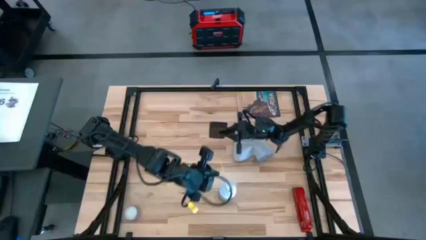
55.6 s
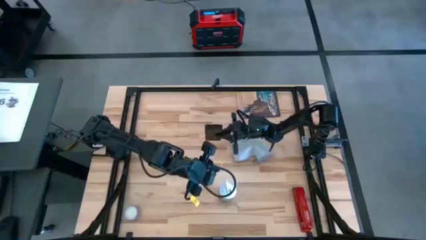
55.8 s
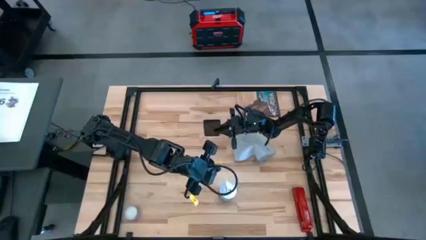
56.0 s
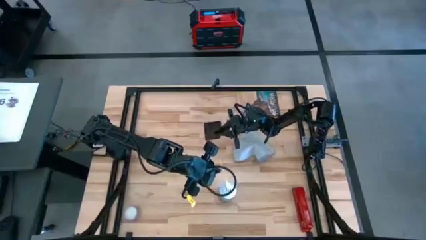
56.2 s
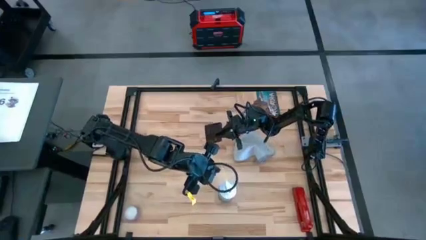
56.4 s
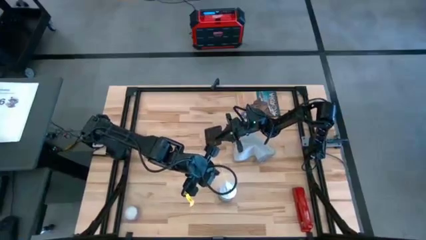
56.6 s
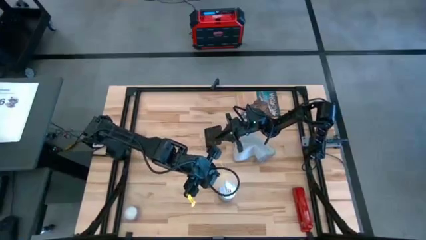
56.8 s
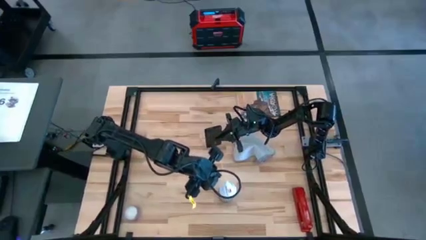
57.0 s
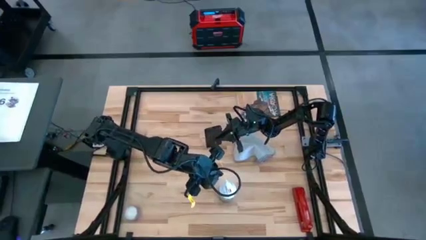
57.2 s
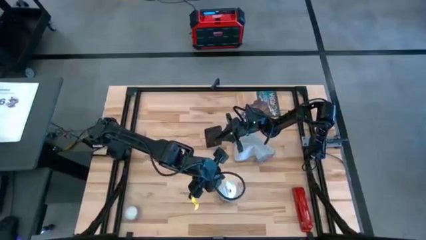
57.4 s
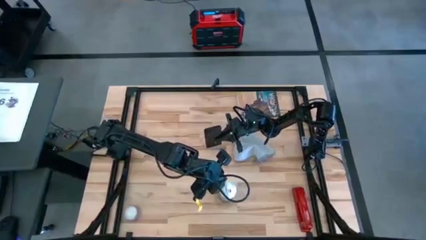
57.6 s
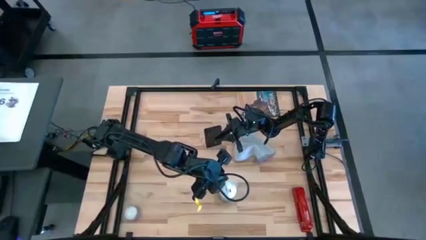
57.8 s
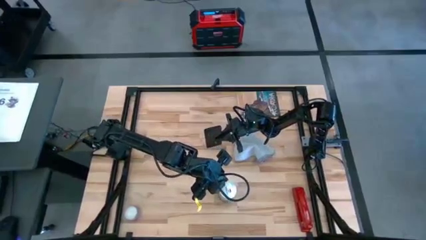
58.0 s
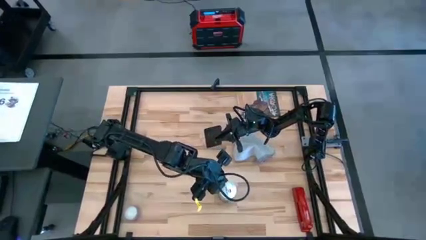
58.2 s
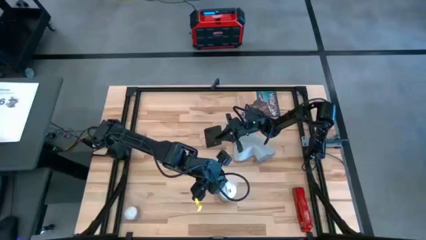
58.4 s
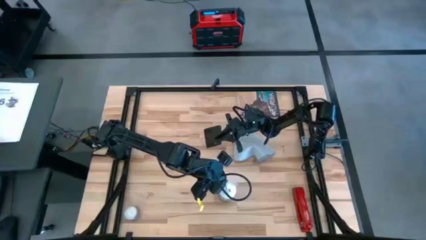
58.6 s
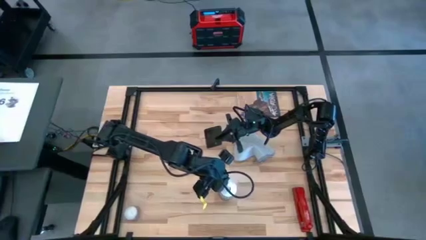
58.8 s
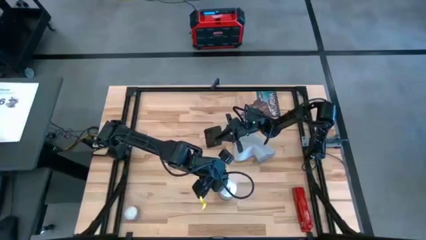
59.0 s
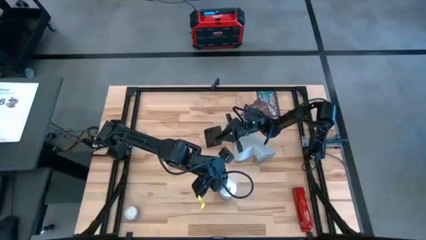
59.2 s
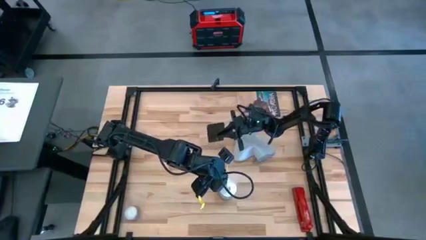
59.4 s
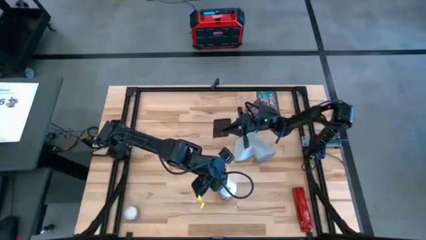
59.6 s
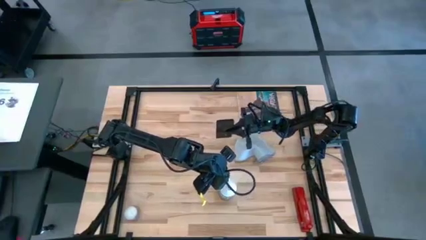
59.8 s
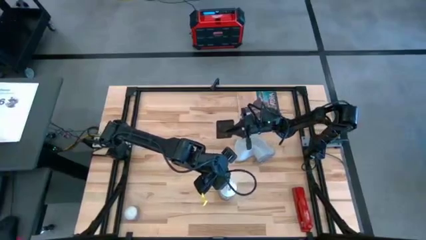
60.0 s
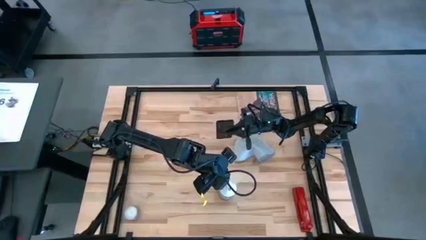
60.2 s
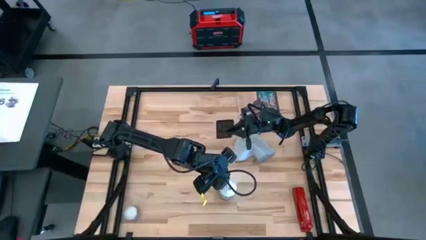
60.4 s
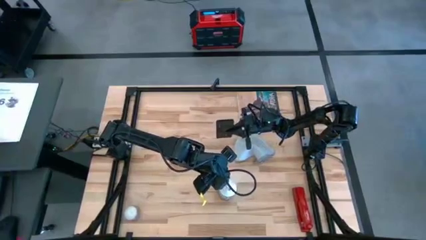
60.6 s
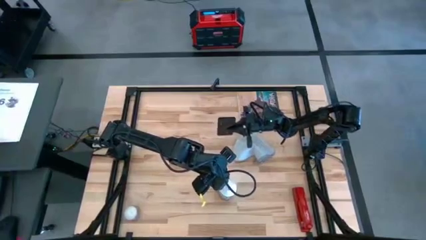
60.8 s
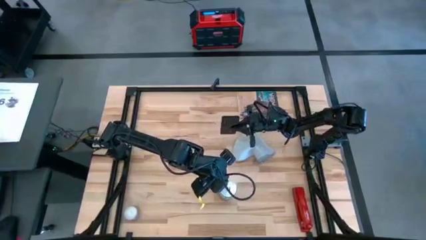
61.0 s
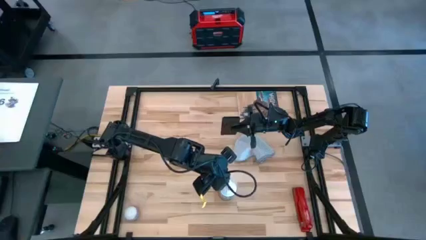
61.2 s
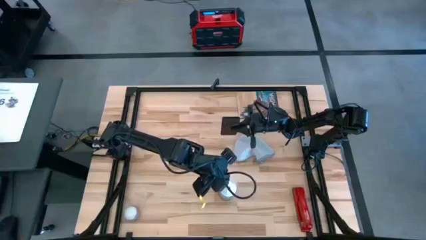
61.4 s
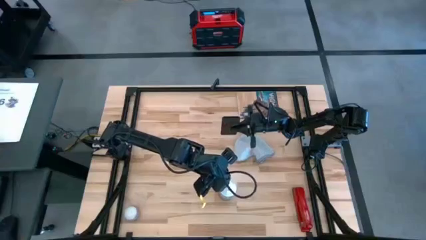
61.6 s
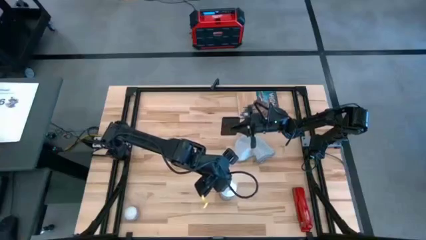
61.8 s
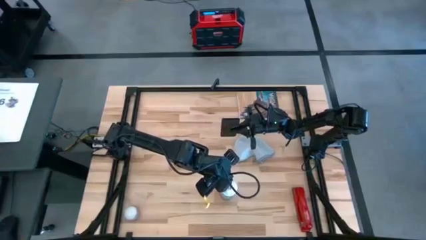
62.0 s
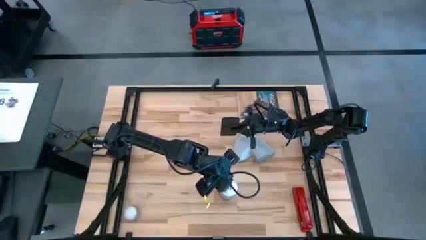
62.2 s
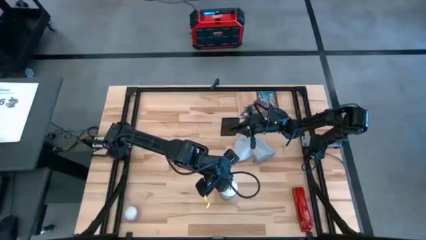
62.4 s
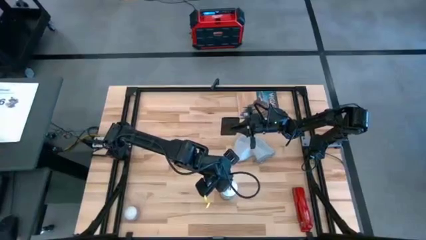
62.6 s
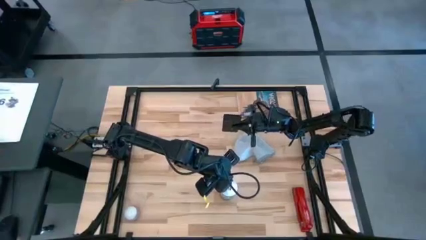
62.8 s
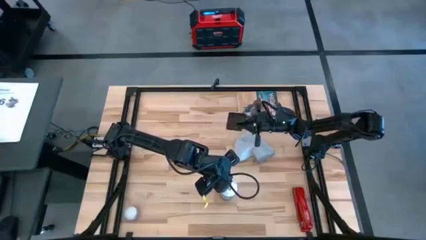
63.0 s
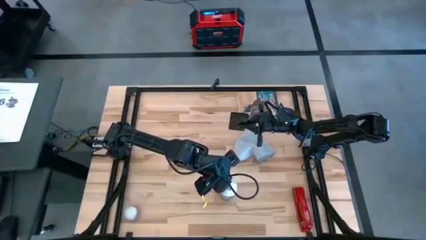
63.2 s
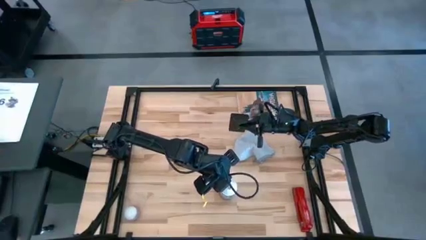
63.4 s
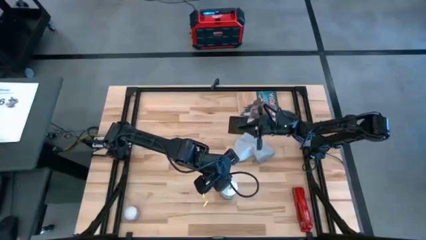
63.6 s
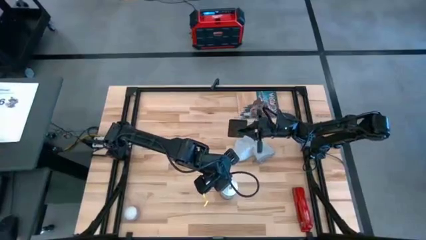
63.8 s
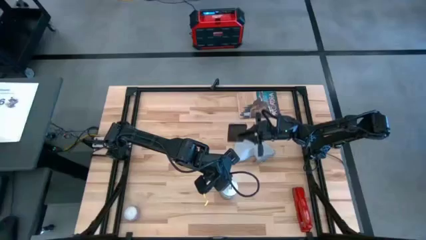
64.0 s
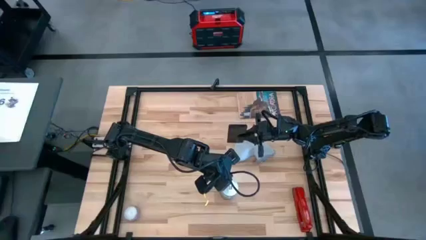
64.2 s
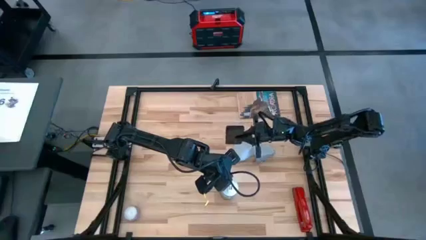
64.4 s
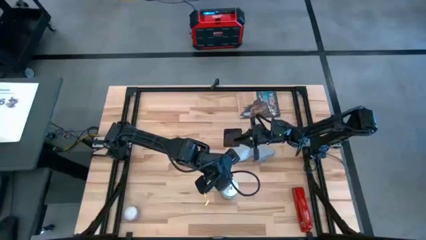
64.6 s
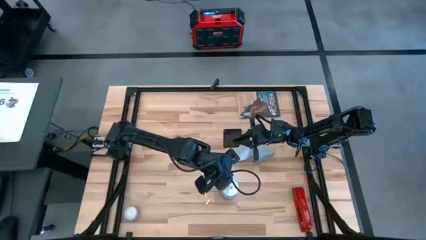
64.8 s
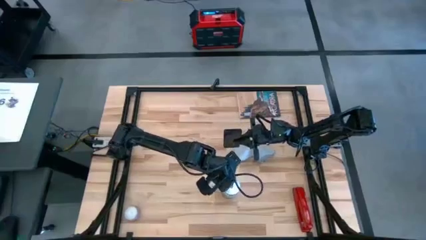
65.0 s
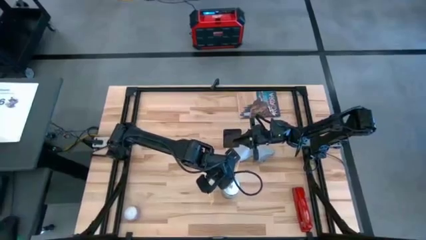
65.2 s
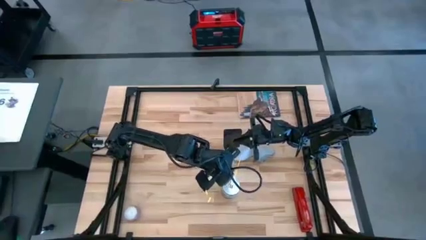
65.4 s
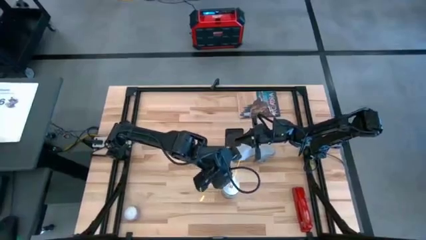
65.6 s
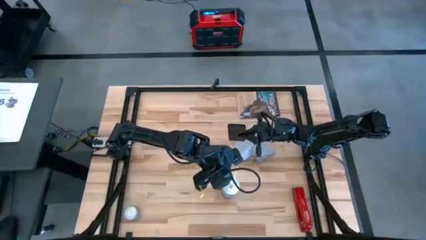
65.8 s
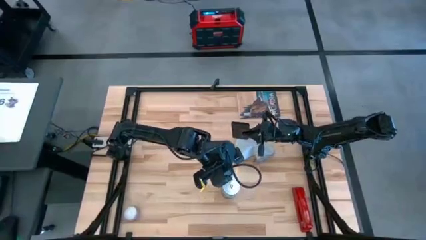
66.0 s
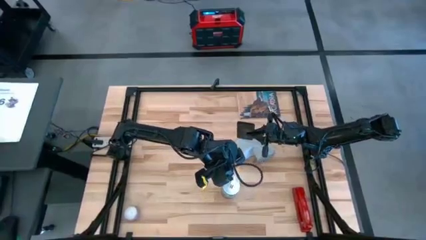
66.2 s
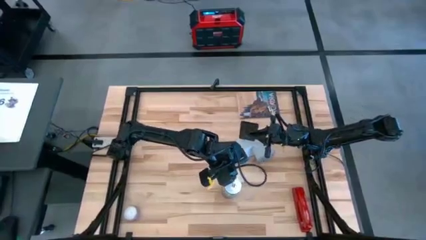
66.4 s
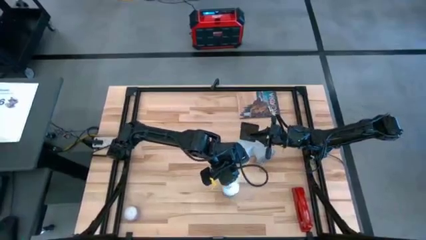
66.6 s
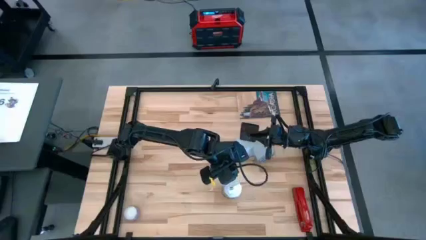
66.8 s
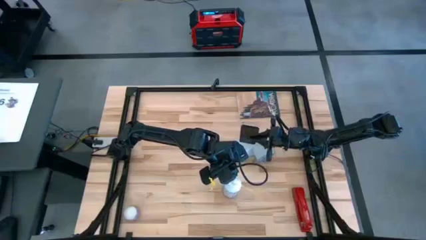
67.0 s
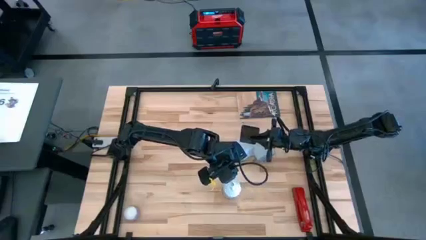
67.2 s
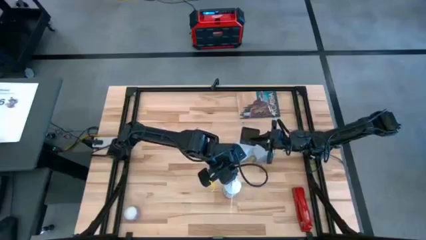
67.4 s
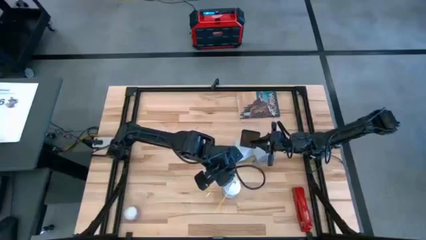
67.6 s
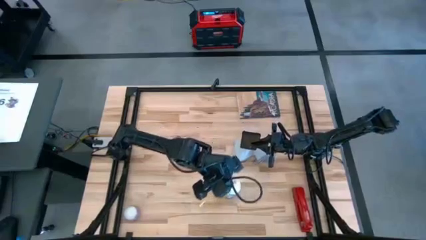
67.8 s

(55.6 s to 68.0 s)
Task: Apply microfiber cloth
Spray the back of the black cellphone using the white spray bottle

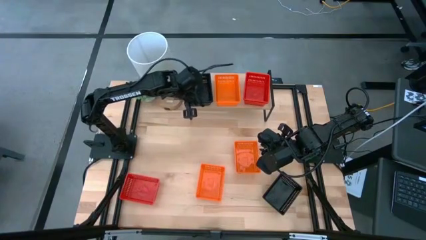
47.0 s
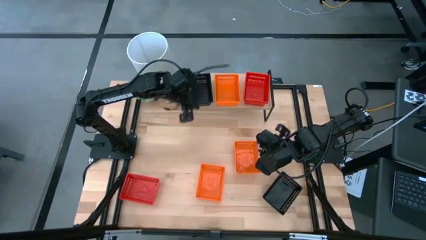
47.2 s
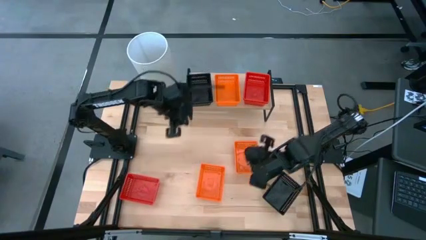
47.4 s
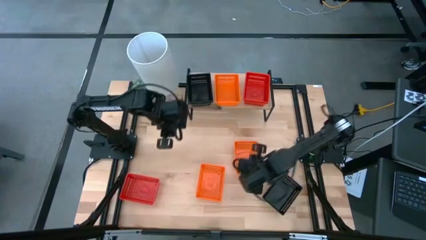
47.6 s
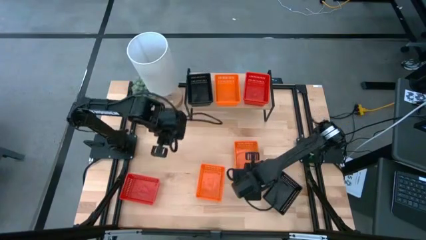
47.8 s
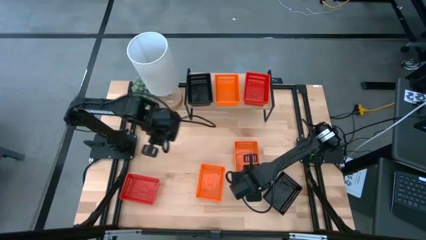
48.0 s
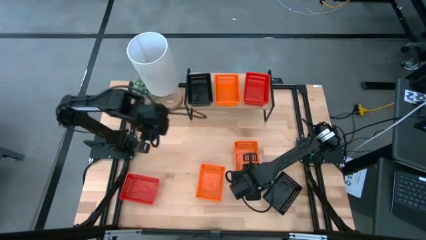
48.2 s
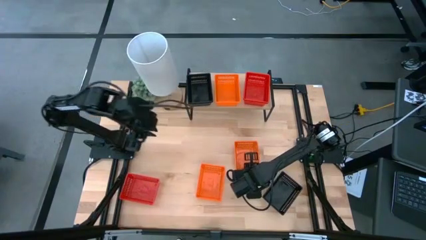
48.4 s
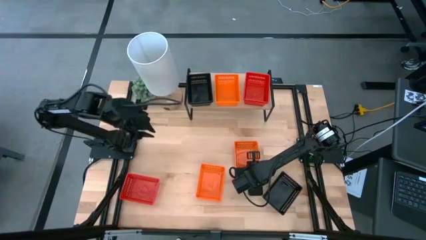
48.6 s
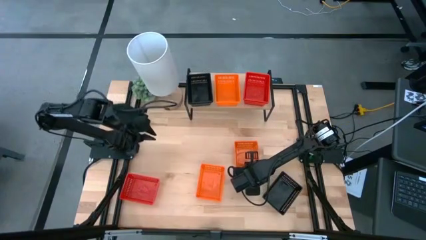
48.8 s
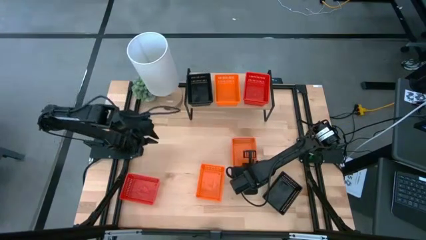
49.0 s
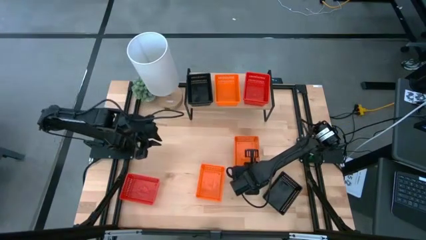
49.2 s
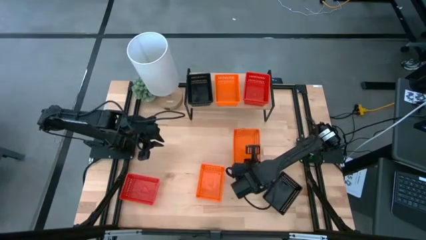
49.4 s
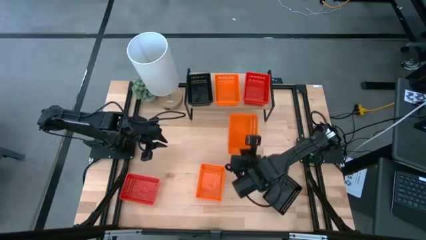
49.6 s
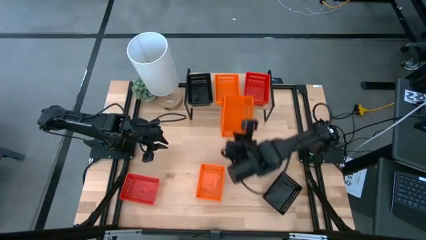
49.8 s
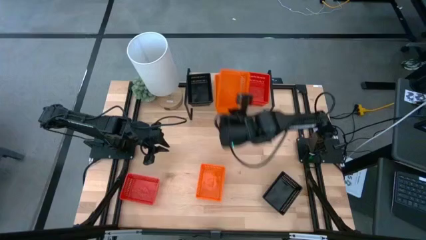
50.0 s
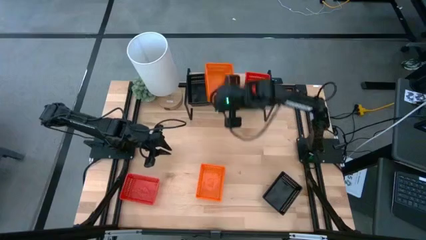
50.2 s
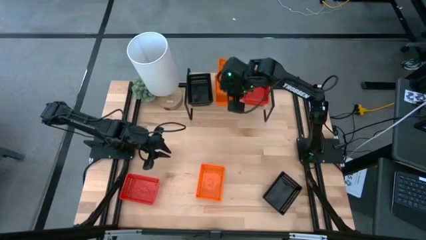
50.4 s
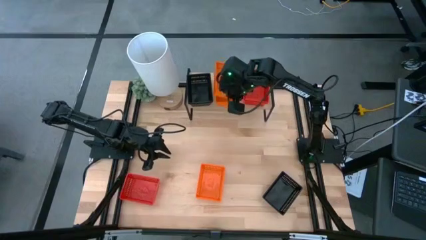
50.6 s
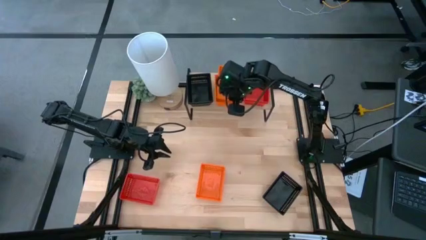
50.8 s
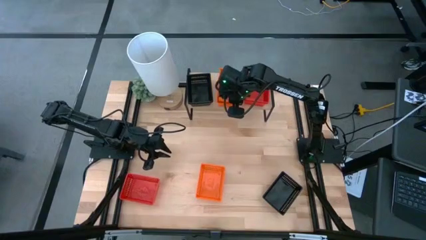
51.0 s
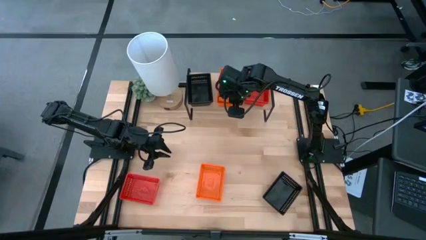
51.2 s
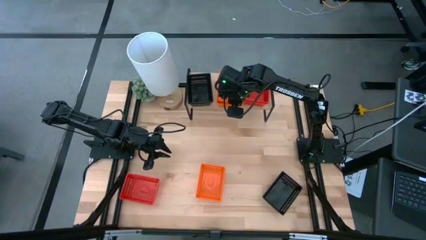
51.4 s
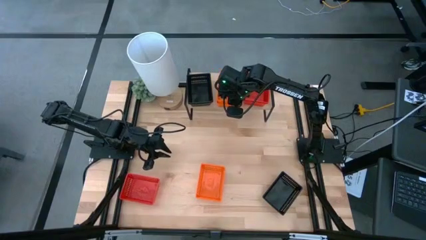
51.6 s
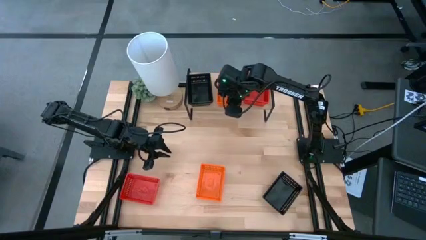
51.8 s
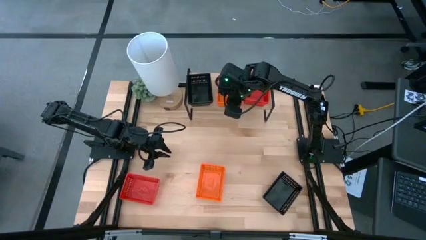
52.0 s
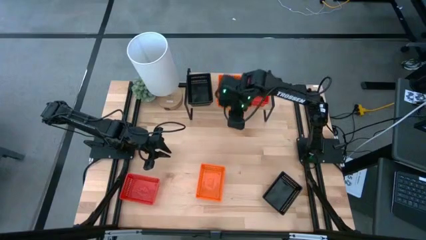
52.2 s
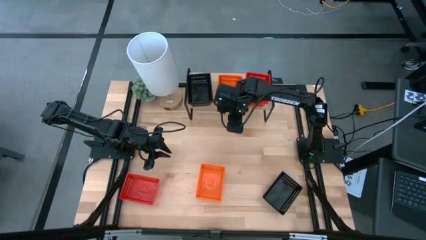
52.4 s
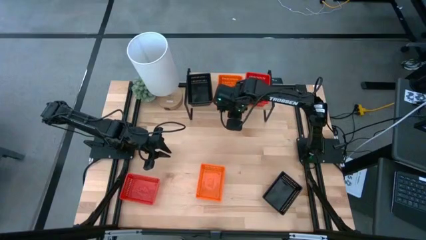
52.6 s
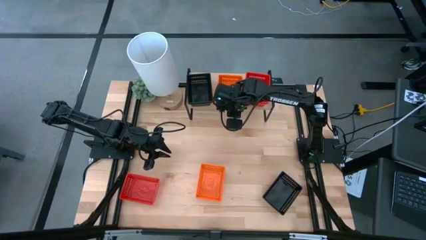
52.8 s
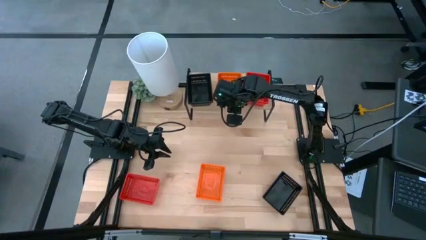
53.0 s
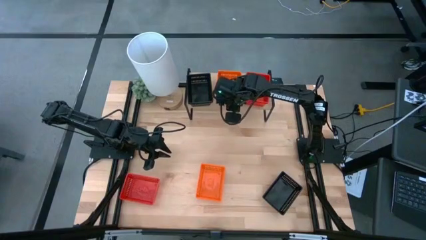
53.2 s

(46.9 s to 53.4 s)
Task: Stack baskets on shelf by color
Stack the top orange bin on top of the orange bin on the shelf
